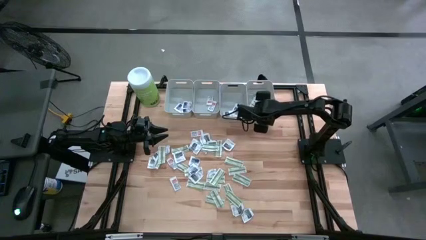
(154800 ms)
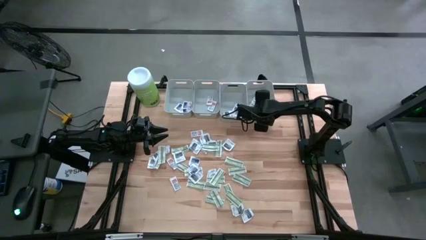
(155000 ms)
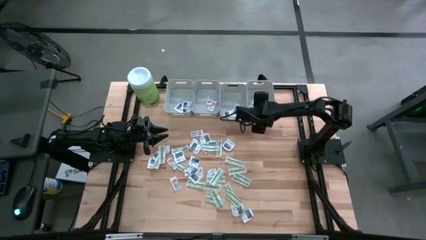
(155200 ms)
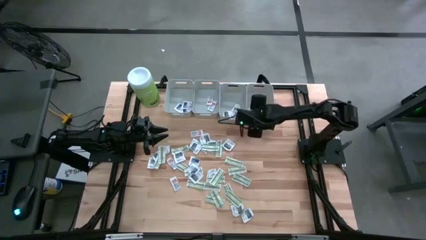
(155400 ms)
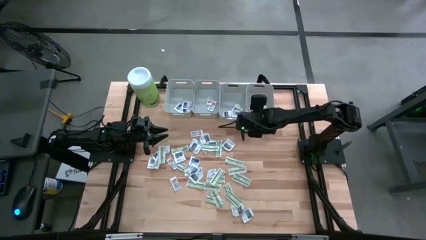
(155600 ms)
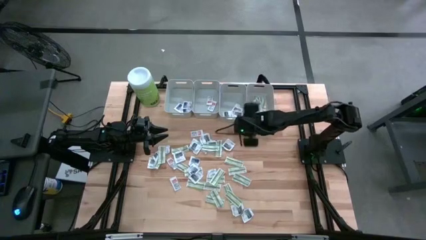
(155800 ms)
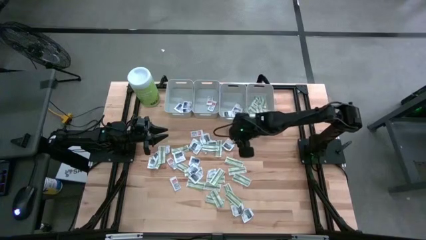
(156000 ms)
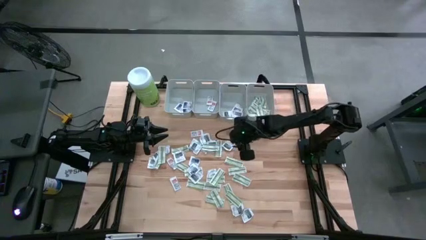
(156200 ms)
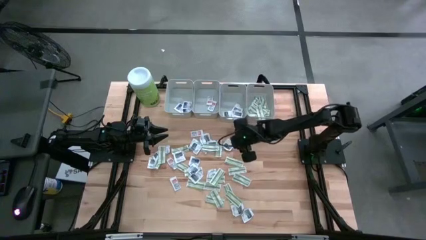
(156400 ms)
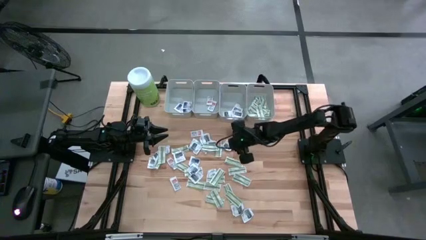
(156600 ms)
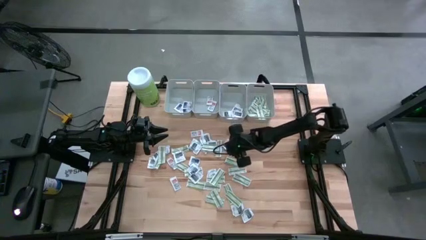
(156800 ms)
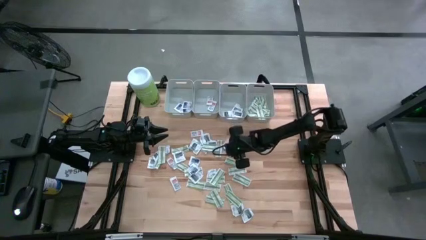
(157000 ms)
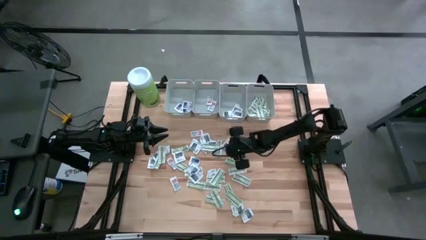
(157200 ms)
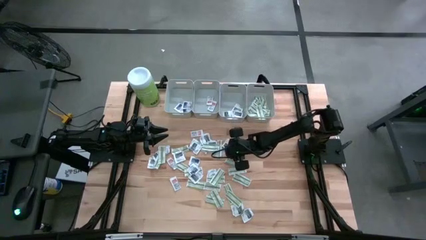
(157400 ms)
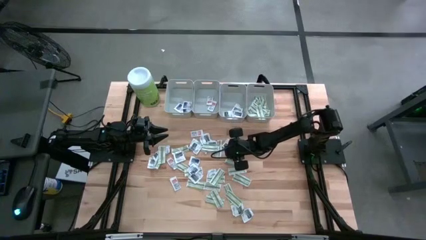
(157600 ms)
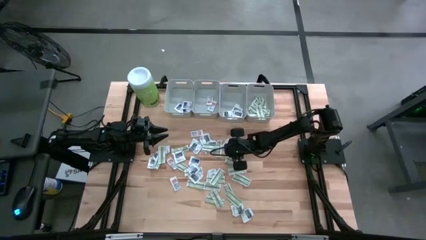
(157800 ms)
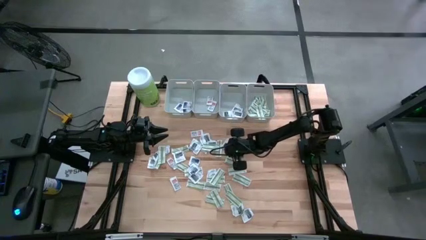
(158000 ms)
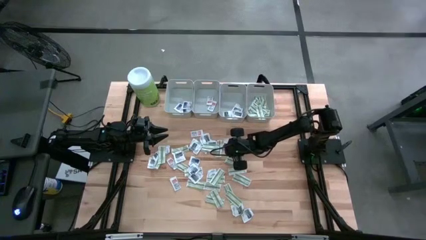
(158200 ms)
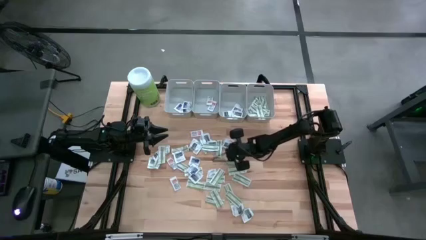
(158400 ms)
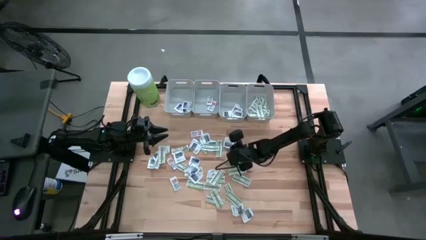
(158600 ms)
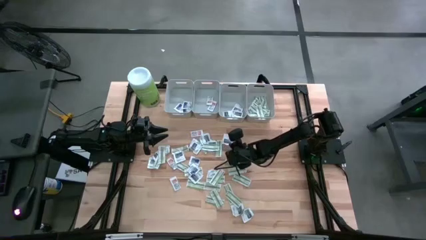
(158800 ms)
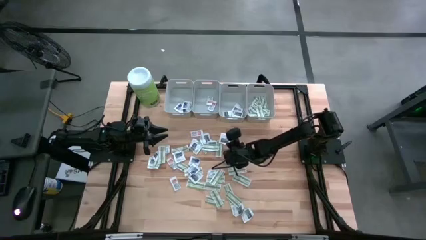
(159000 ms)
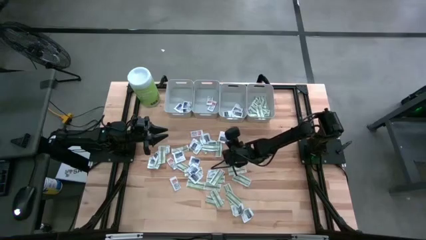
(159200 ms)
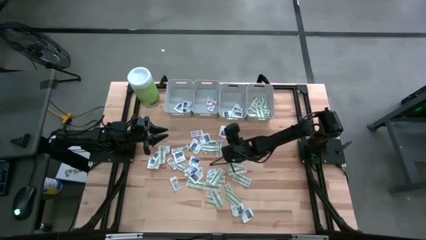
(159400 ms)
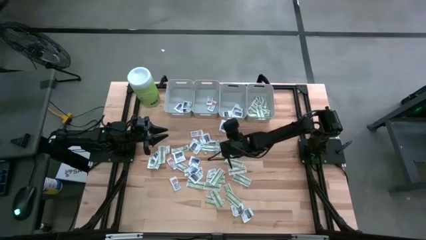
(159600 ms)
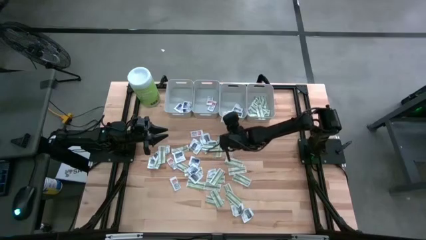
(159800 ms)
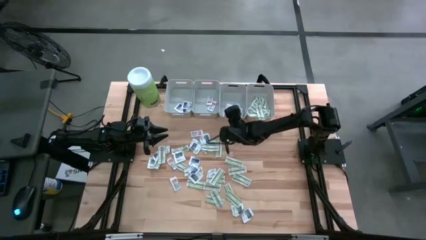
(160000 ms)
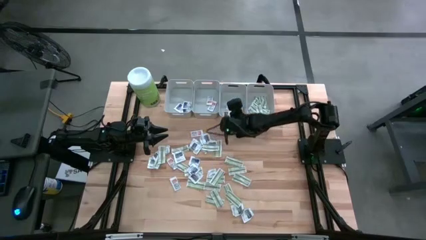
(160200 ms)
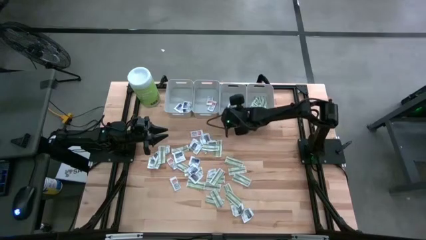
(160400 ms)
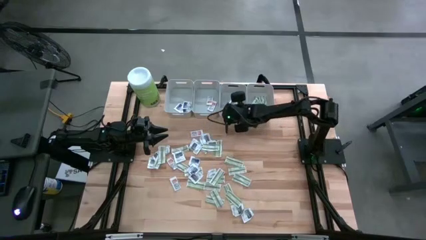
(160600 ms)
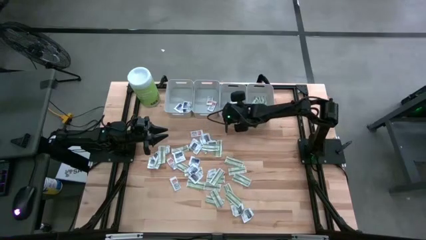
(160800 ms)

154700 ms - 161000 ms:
Task: Pick & Place First Aid Supplies
Put the towelette pack into the middle right gray bin

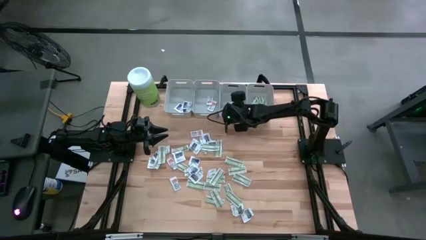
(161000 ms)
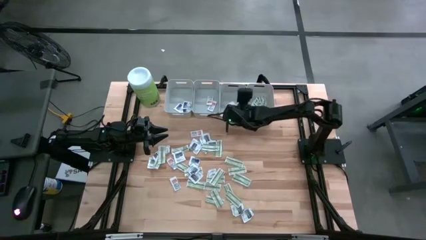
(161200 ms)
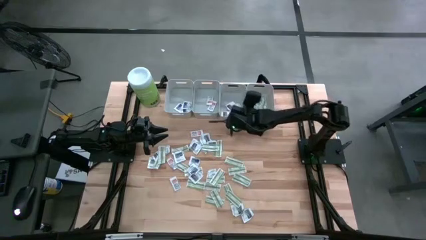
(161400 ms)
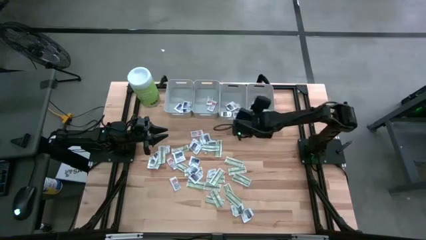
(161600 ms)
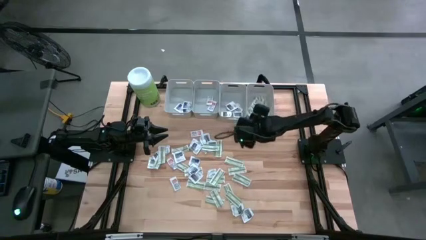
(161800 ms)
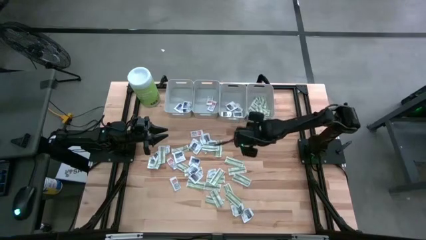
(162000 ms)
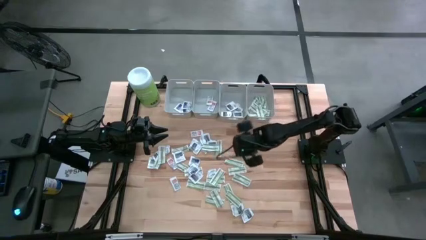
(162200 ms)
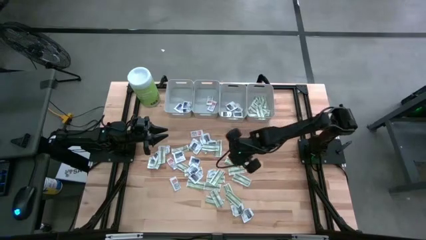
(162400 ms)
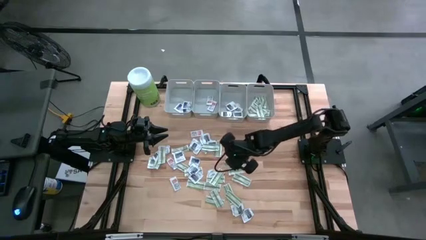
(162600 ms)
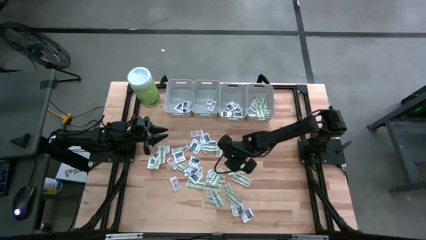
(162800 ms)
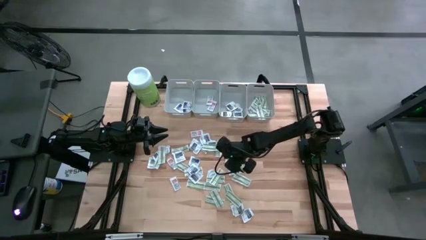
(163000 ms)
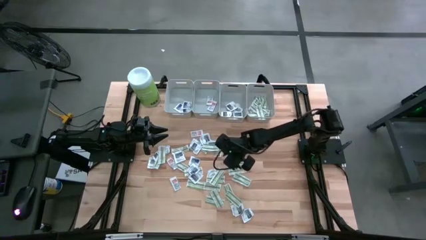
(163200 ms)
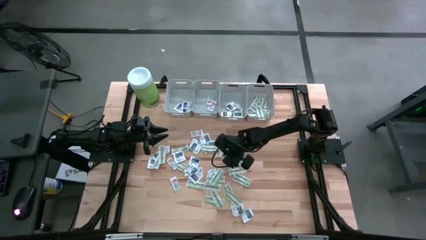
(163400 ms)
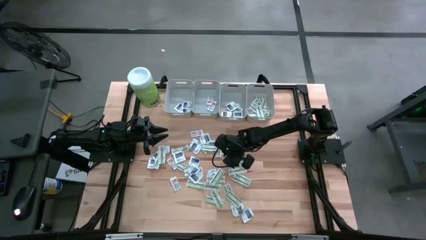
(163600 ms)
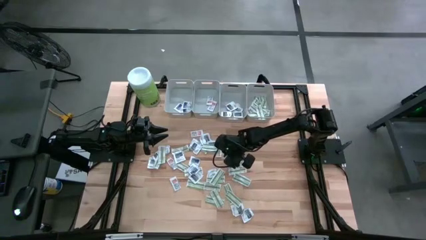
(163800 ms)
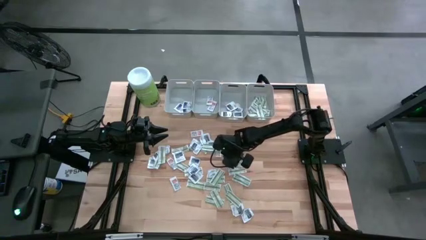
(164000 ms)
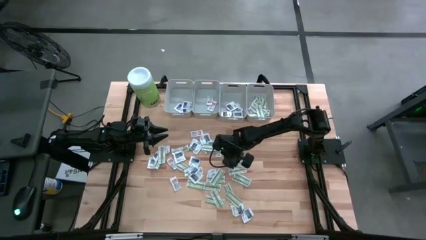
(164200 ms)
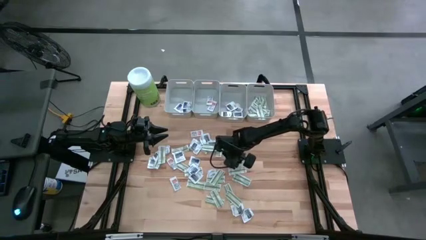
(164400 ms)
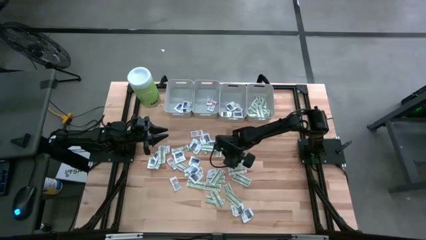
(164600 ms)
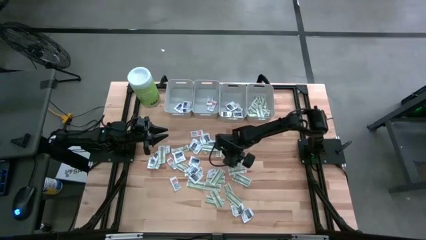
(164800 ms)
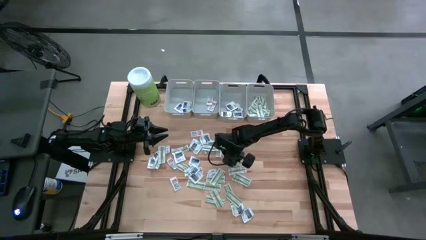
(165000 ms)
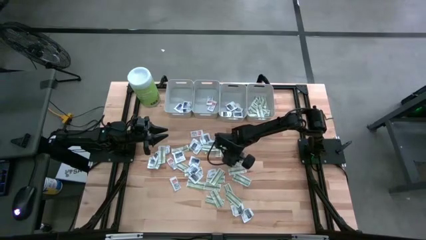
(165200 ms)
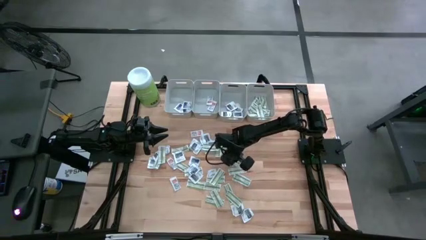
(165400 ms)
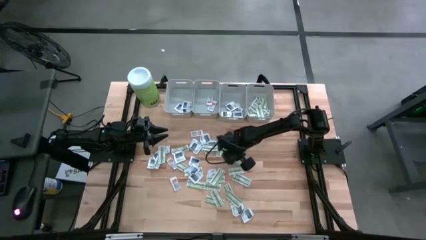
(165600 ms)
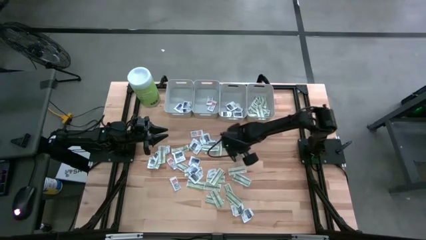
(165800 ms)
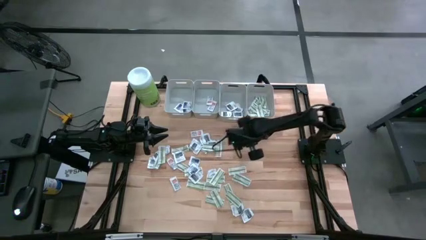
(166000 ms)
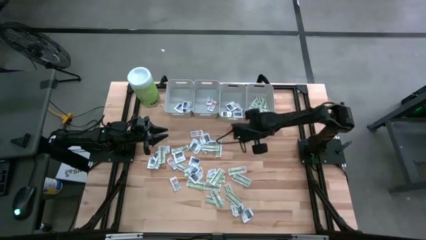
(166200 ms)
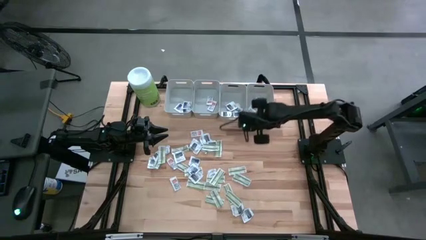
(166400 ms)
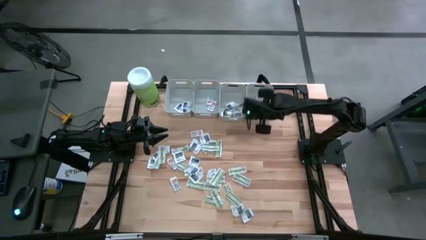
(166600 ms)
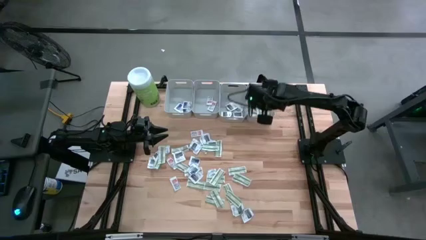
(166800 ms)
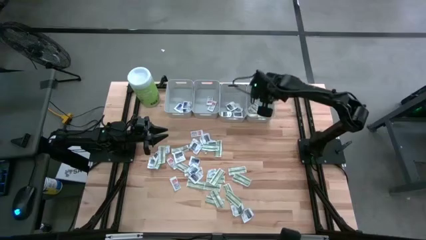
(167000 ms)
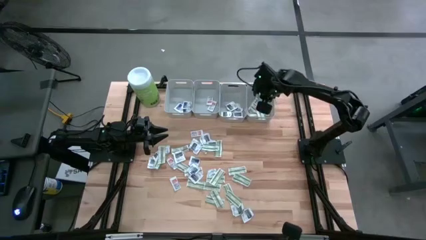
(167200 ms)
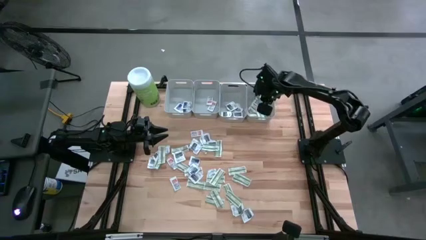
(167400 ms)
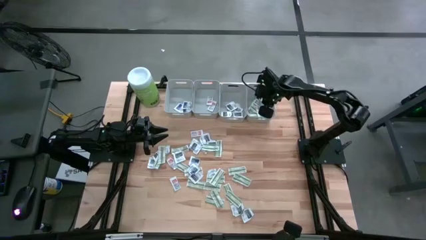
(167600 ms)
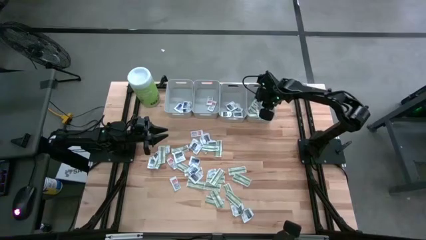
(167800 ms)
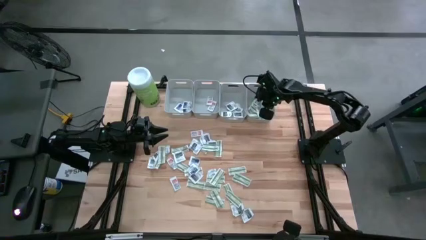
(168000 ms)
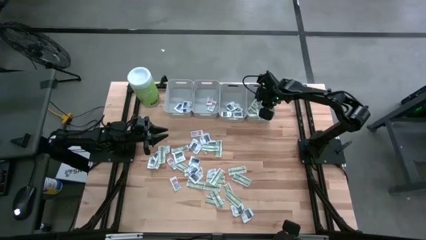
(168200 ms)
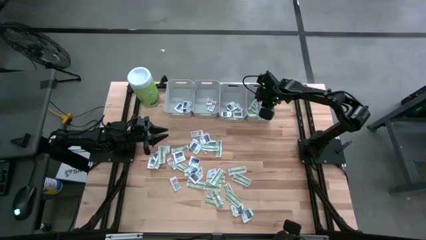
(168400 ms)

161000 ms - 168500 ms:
Put the bandage into the right gray bin

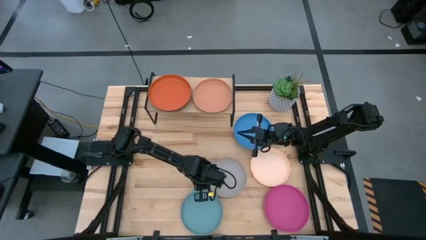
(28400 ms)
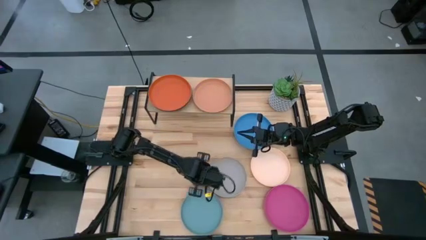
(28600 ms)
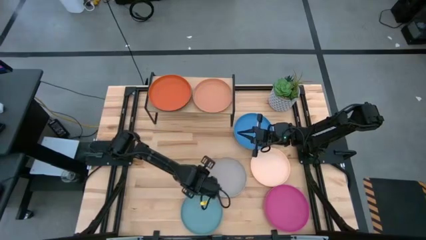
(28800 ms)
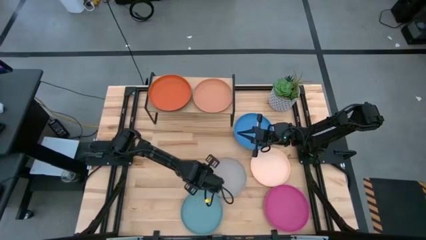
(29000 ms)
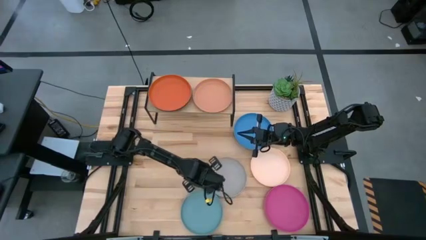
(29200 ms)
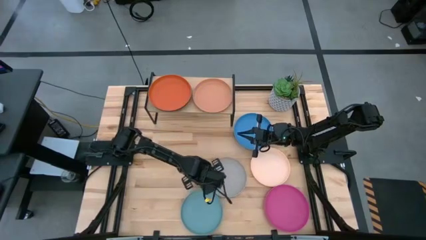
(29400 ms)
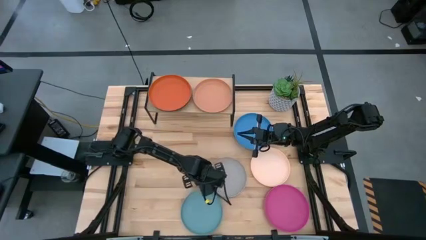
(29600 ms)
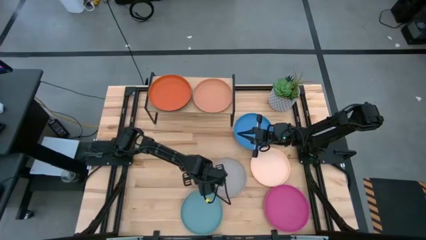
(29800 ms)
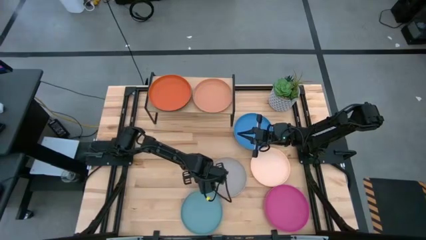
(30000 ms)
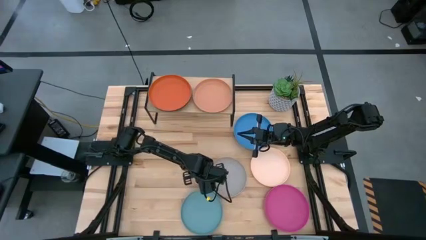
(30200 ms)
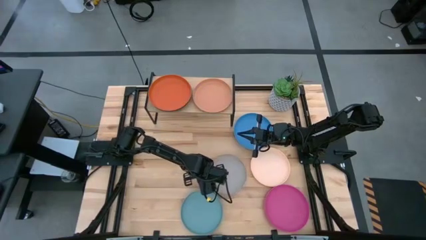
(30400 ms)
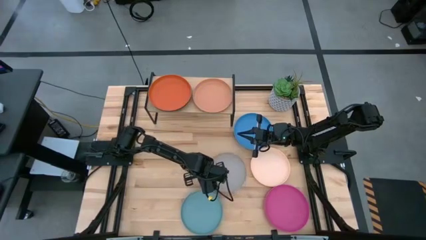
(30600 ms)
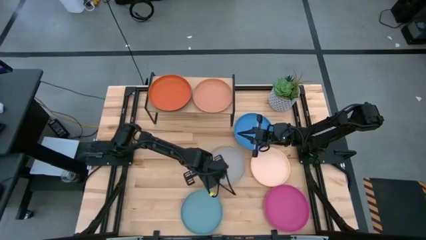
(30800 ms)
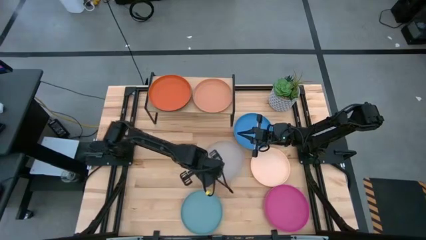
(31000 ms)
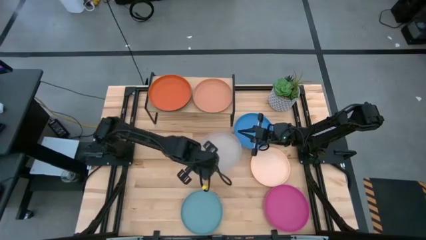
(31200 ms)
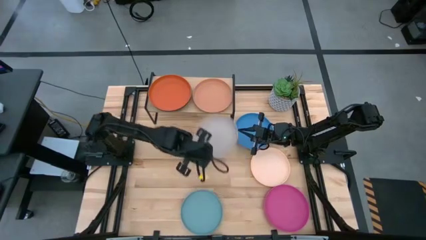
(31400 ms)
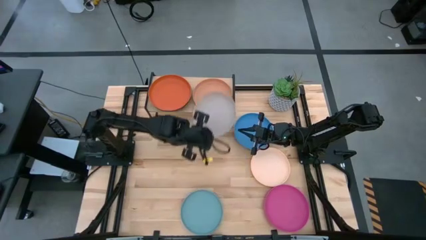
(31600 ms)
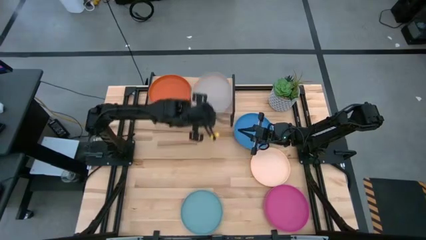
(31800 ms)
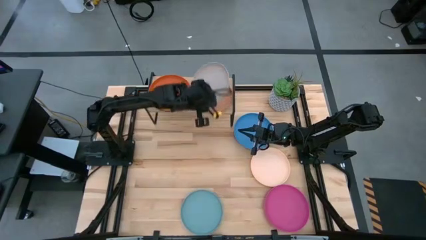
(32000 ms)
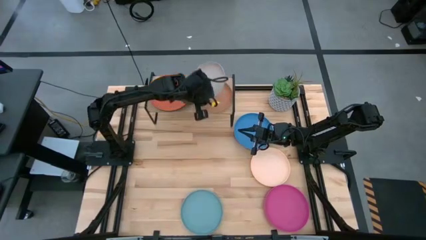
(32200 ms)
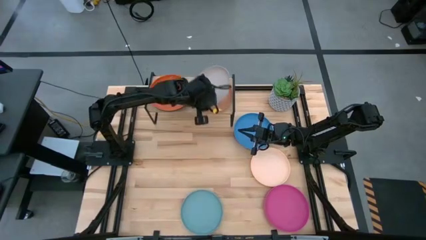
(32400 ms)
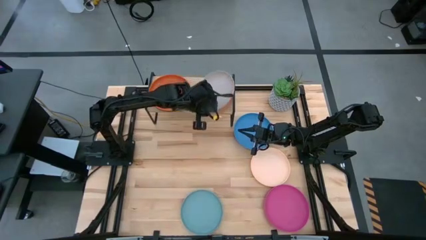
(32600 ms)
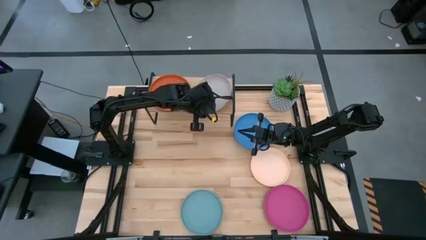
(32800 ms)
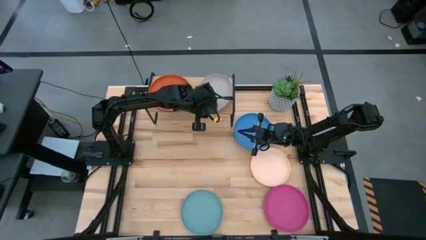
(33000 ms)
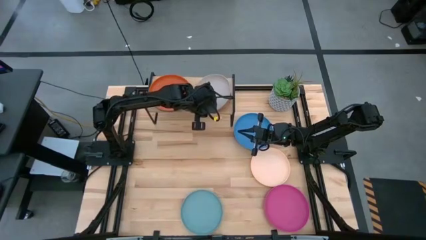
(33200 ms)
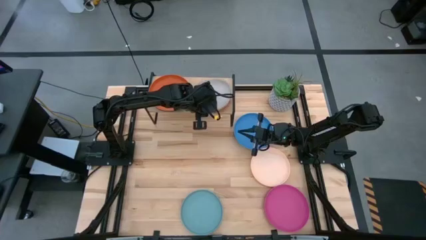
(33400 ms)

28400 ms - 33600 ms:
Task: Place and stack plates onto a shelf
Stack the gray plate on top of the light brown plate on the shelf
